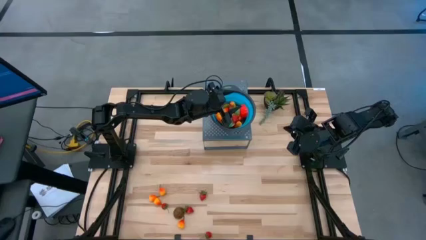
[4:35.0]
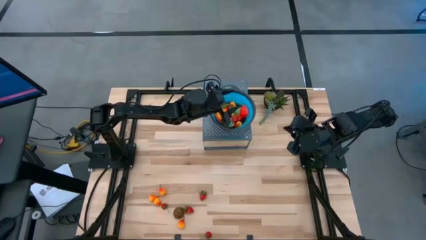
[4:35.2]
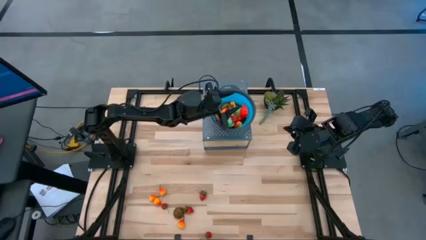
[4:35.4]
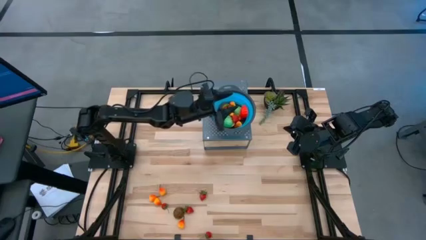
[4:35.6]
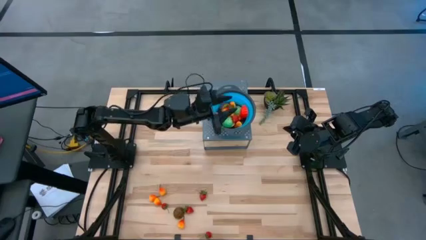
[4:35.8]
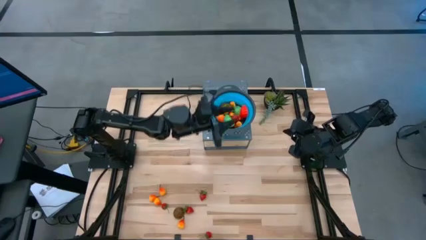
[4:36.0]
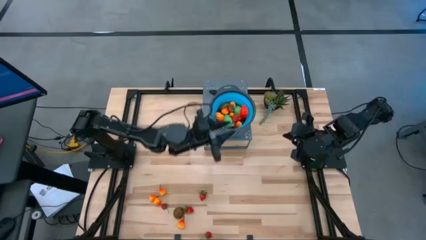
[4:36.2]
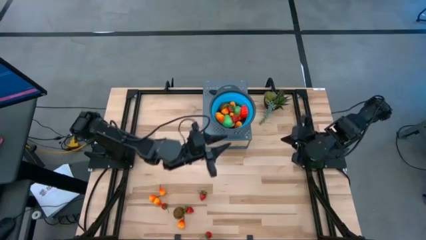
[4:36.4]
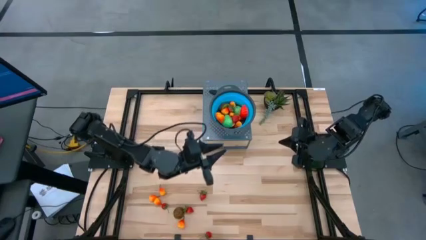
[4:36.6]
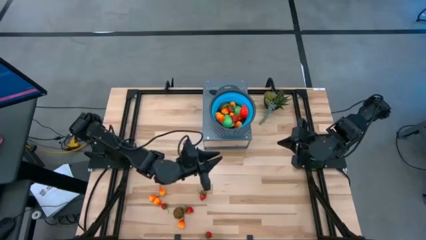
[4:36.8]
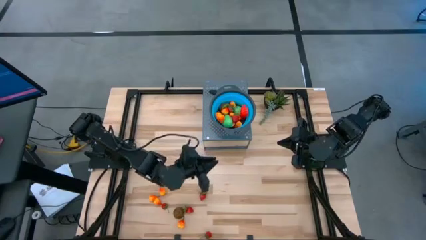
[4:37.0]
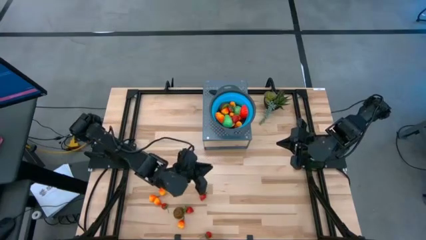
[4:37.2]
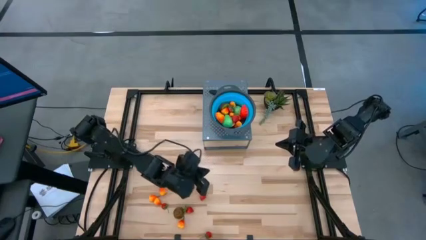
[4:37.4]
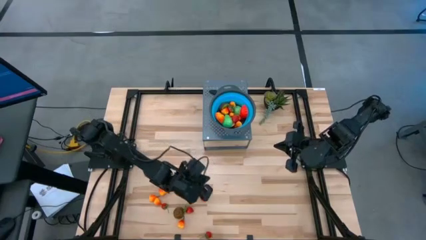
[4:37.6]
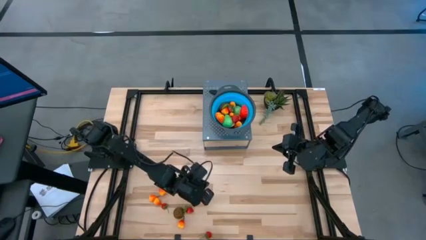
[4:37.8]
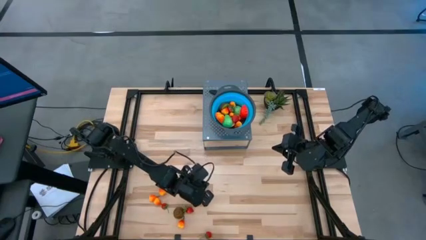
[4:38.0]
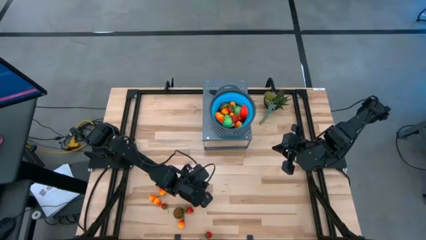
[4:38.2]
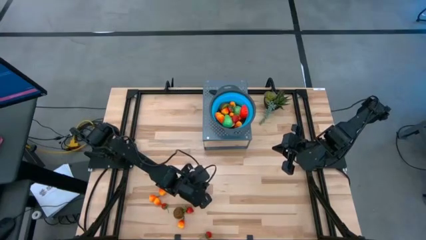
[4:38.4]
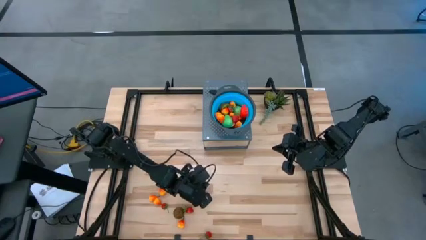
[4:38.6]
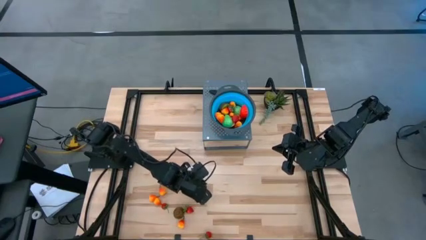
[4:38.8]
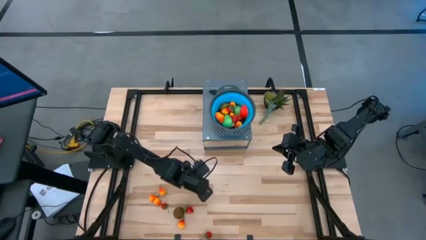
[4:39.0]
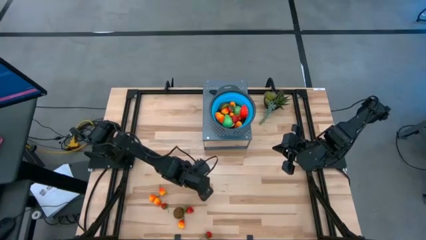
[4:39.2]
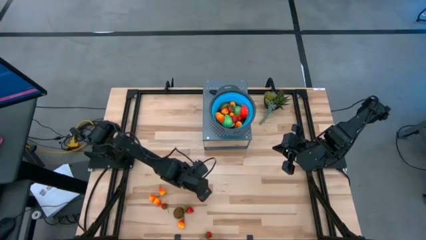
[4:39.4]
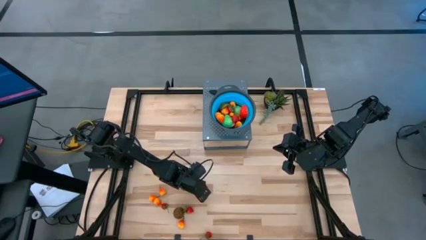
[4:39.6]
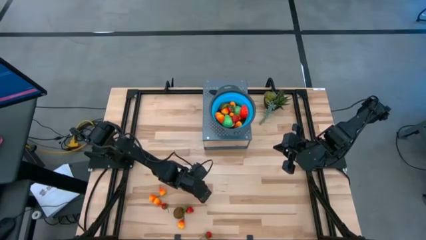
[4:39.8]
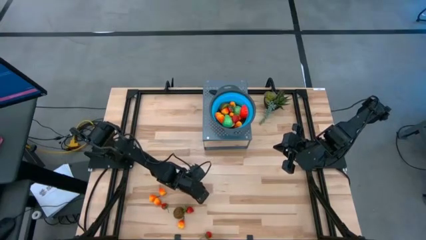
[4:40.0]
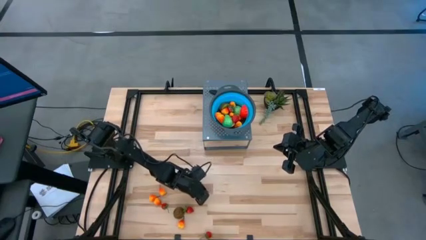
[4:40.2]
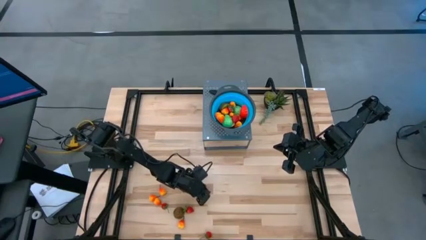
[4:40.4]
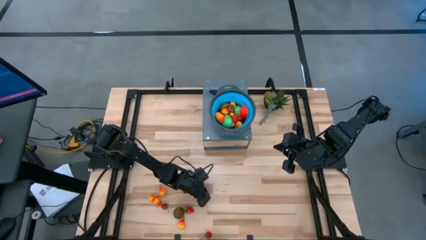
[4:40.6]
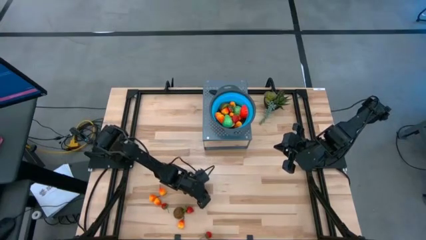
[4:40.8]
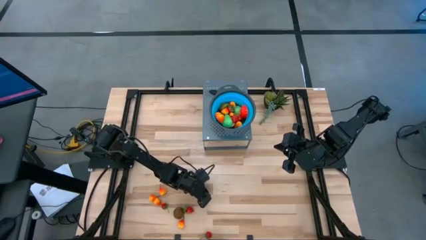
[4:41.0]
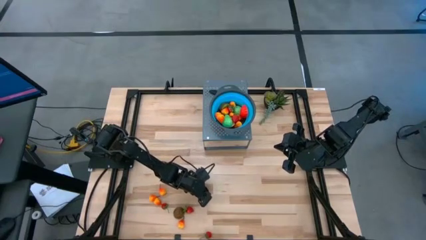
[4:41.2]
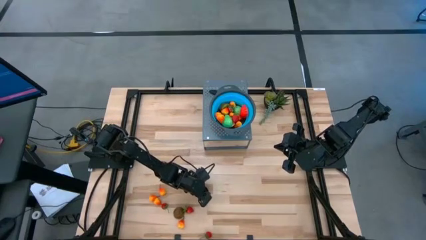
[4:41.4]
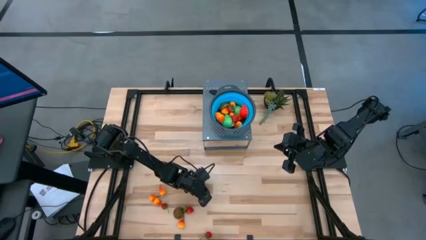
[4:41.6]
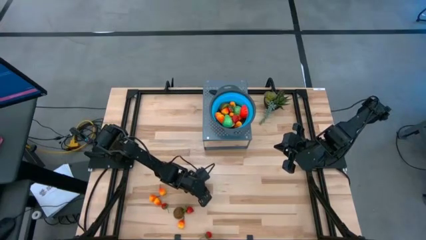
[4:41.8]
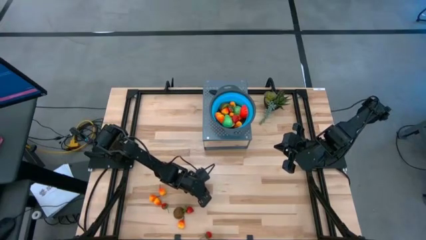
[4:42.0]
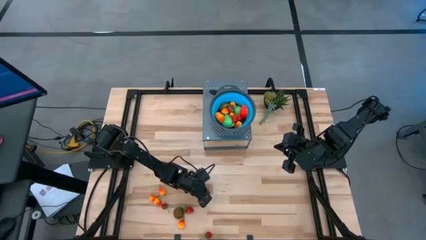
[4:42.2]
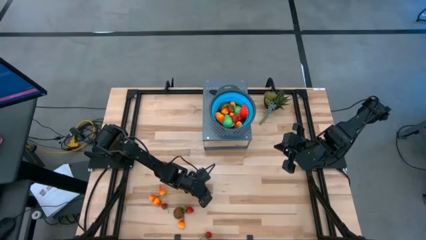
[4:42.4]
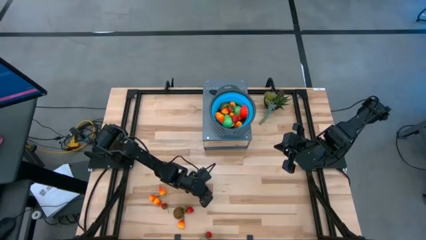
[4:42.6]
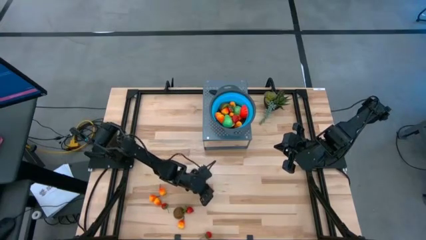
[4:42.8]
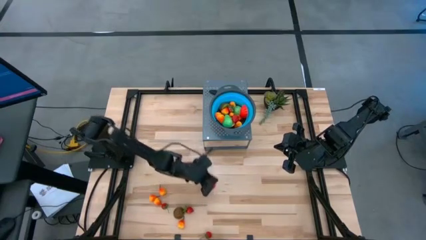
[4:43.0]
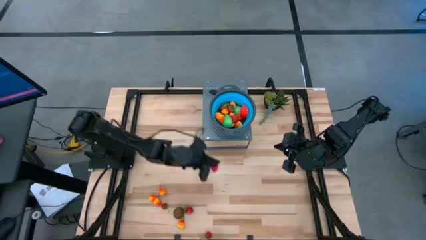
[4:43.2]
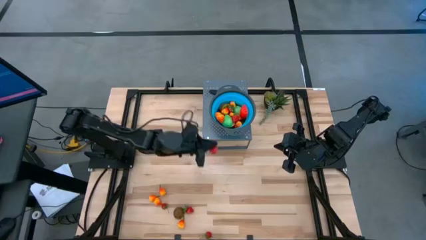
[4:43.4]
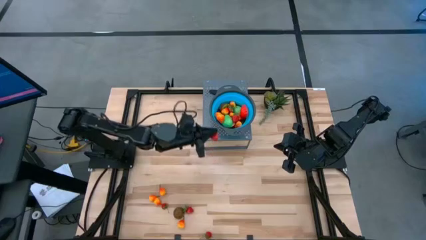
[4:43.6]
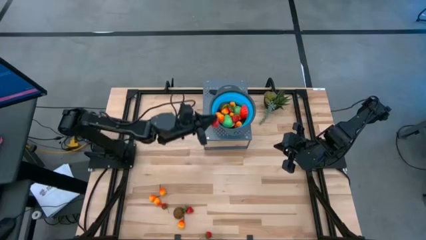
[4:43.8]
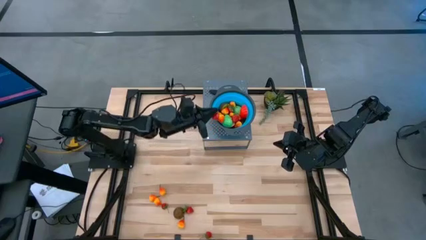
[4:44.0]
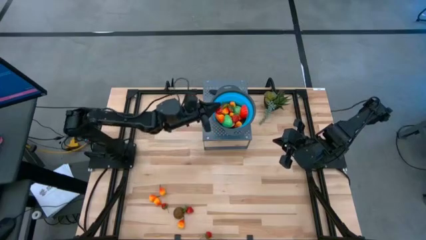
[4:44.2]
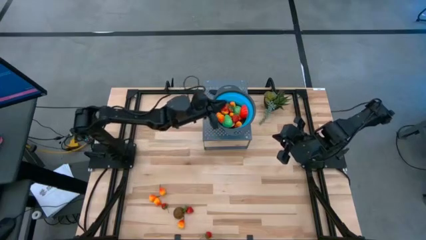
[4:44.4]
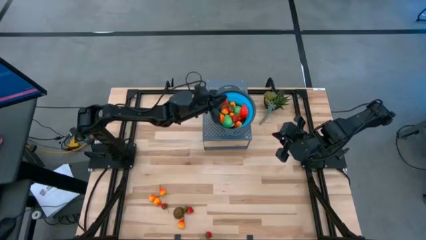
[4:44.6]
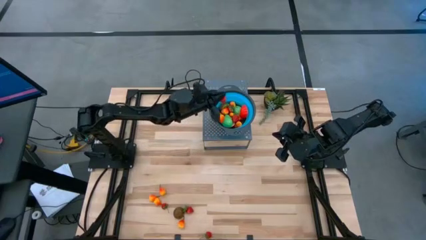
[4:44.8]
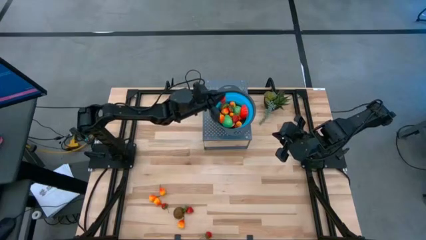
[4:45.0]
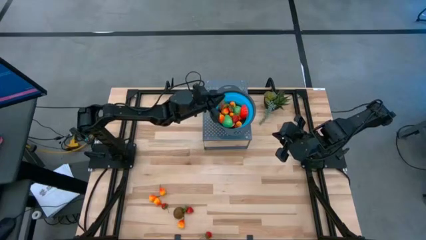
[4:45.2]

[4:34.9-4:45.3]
Task: Pick & Place Fruit
Put the strawberry into the strainer bowl

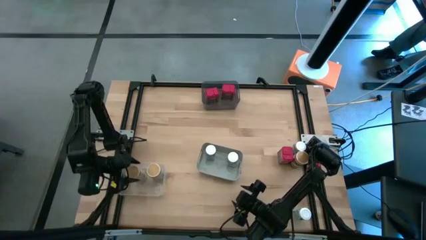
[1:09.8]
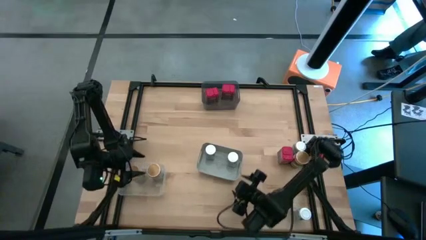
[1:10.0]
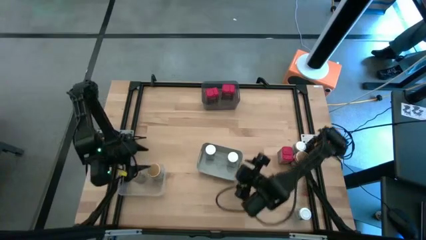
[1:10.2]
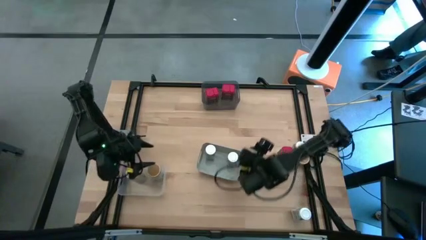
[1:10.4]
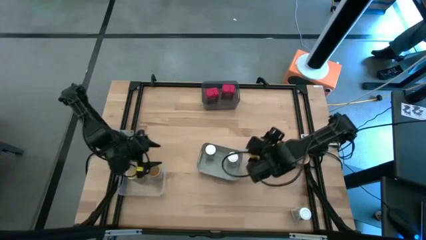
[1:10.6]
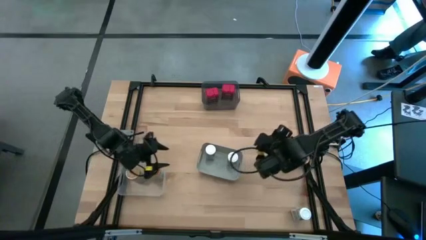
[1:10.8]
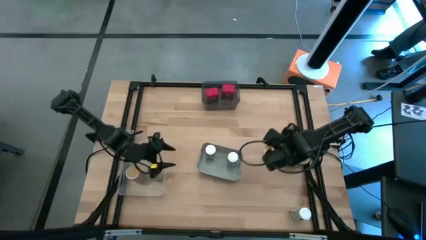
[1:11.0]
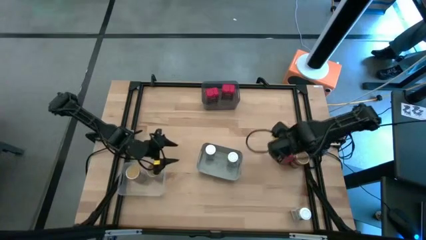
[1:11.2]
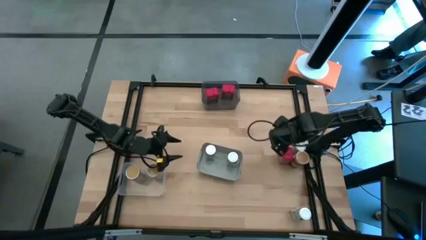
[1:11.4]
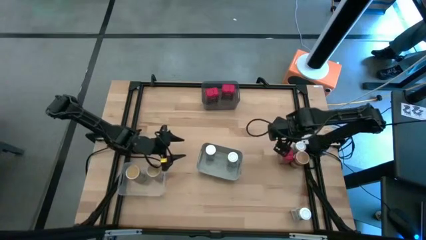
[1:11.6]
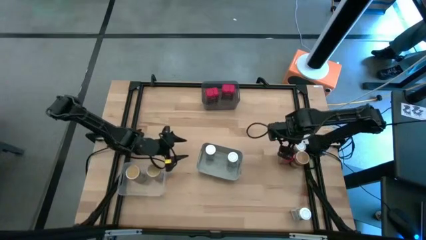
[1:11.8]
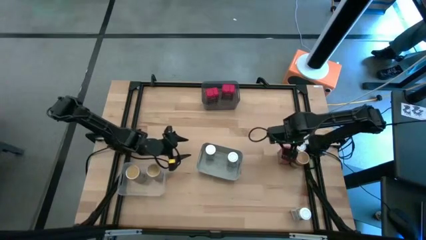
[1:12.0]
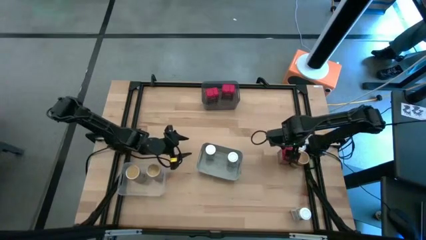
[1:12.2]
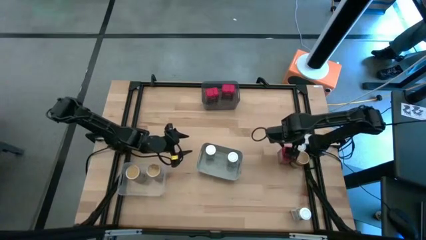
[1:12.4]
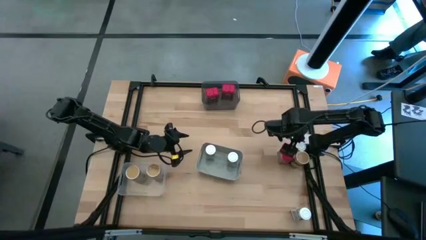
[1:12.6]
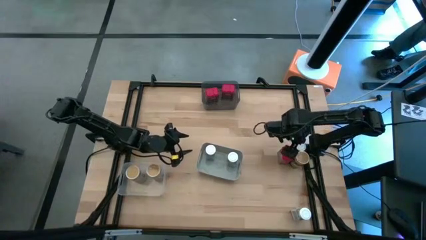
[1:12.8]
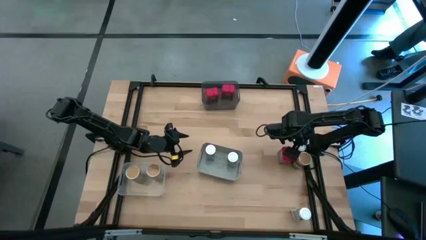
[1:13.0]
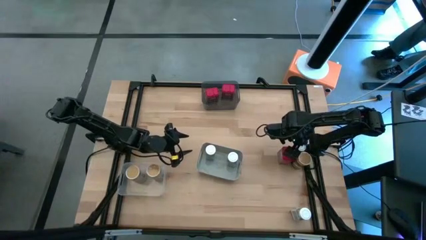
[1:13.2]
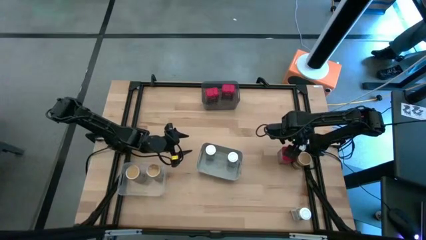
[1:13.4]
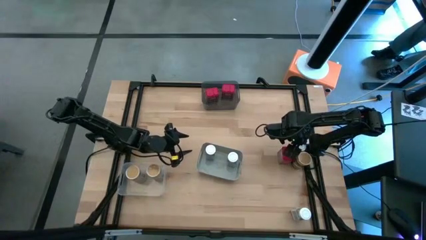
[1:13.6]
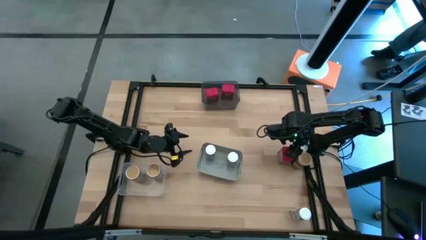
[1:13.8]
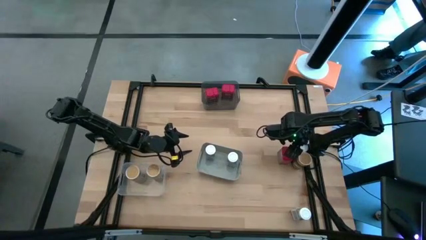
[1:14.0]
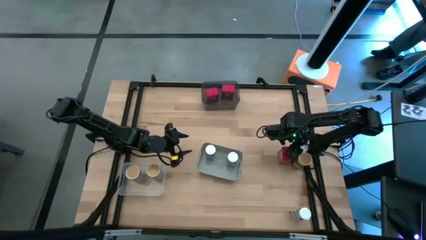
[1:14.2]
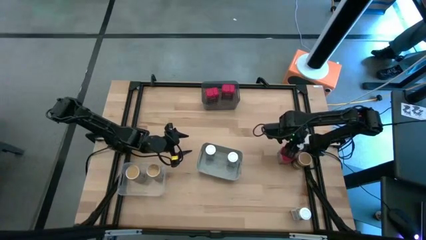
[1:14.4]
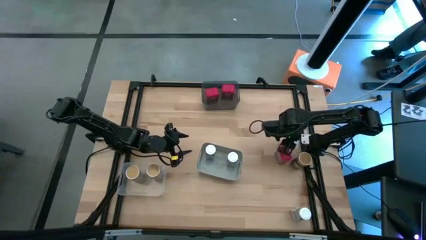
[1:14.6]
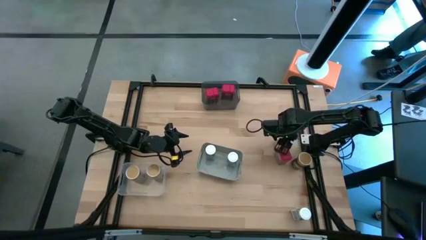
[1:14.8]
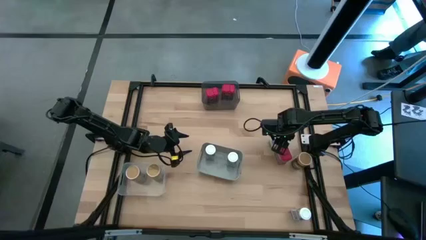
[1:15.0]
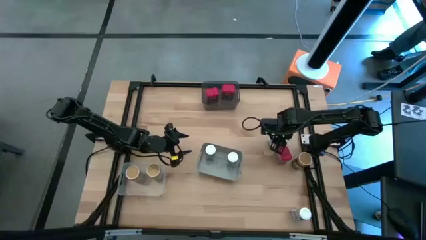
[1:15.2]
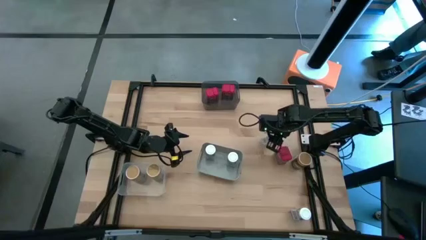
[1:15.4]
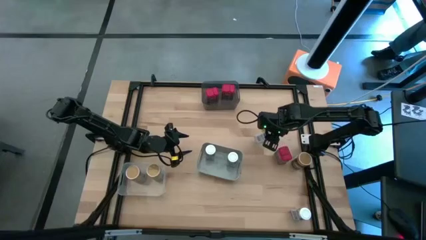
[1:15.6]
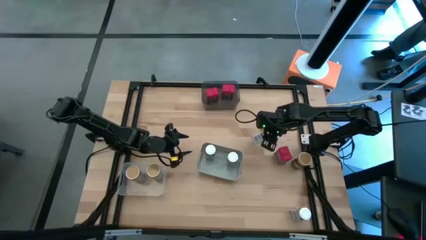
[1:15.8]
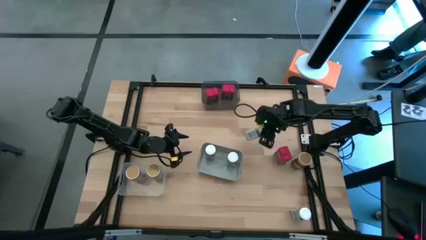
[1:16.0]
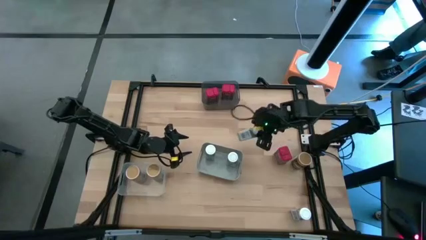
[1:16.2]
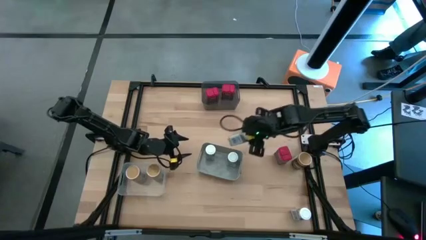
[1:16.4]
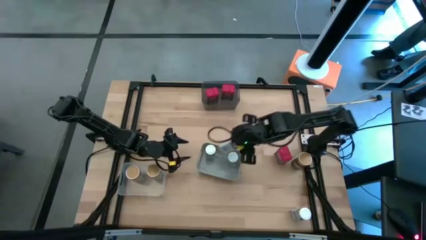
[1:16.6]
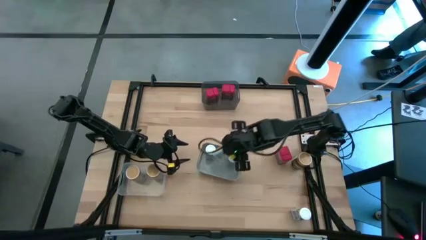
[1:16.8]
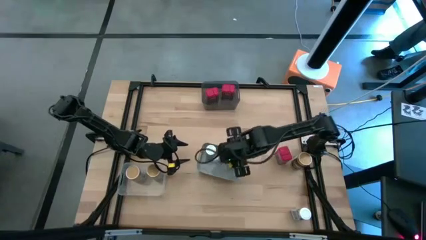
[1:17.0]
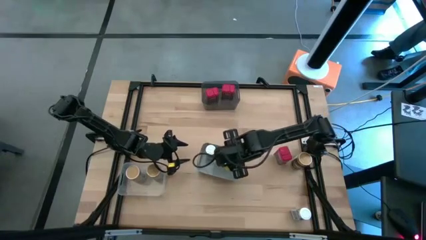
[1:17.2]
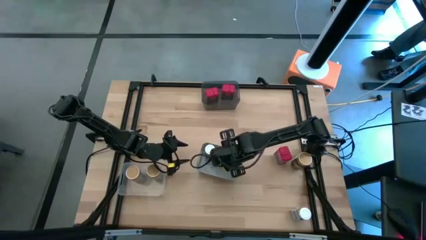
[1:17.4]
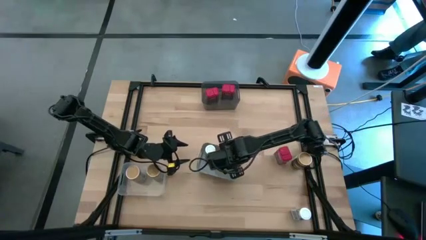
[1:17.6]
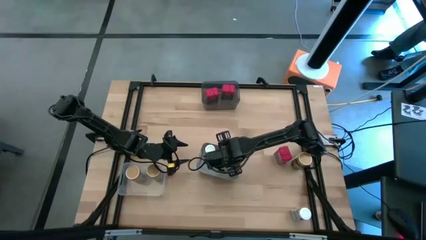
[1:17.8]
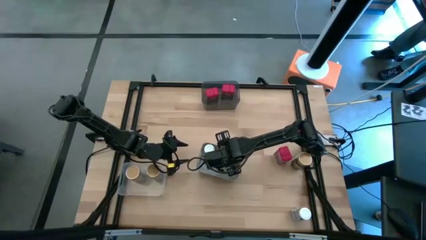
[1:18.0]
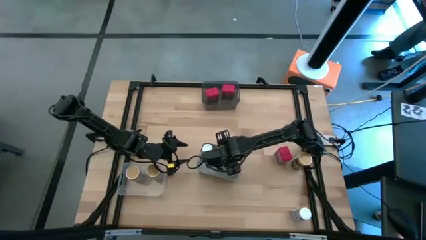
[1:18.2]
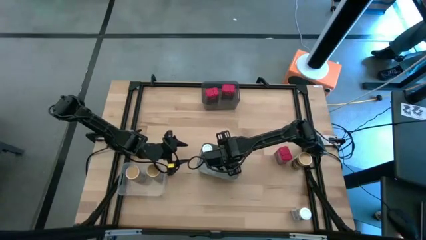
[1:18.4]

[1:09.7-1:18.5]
Task: Sort spices by type
Put the top white seasoning bottle into the gray bin
